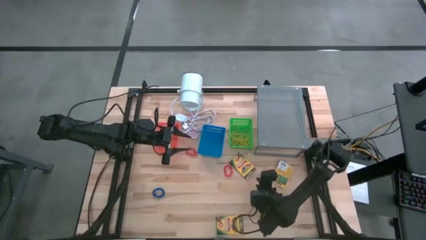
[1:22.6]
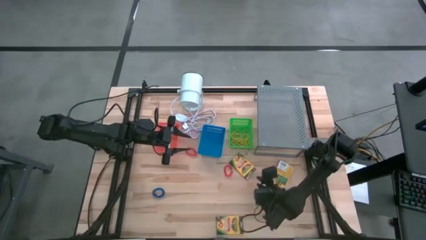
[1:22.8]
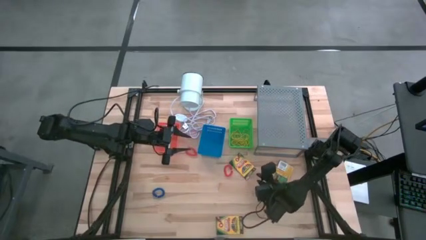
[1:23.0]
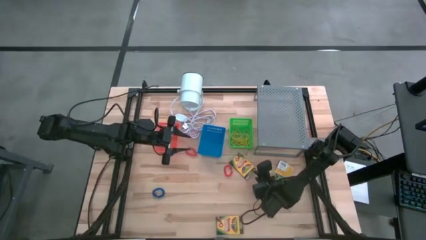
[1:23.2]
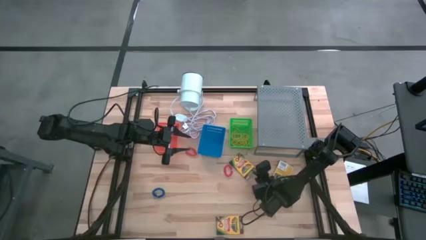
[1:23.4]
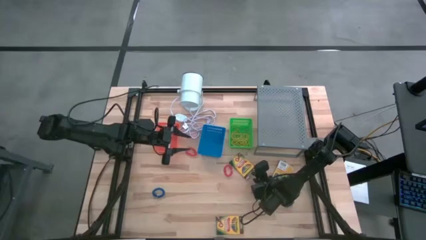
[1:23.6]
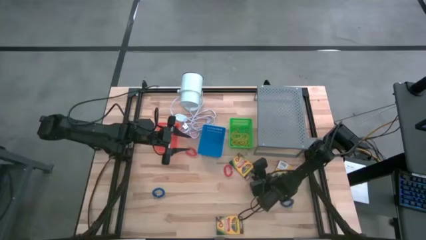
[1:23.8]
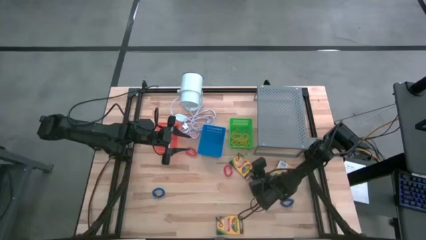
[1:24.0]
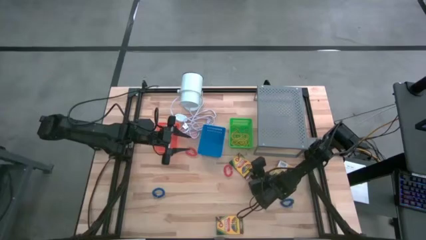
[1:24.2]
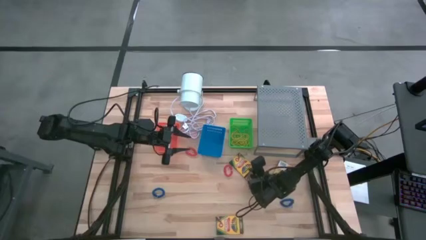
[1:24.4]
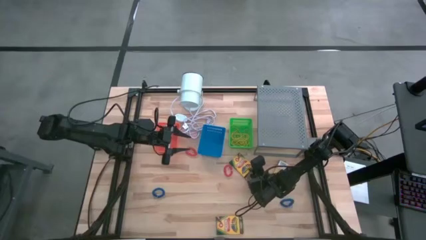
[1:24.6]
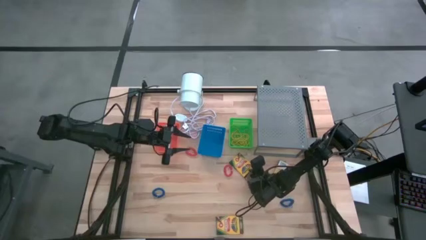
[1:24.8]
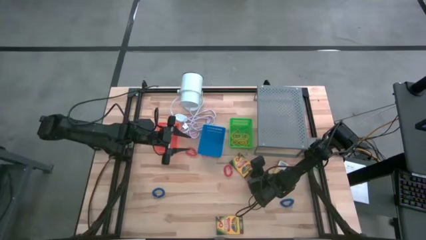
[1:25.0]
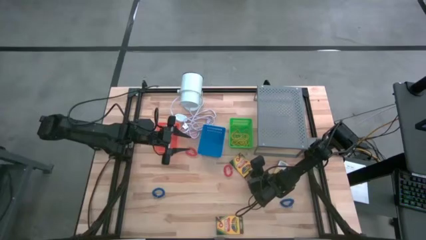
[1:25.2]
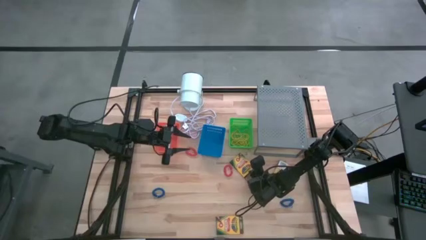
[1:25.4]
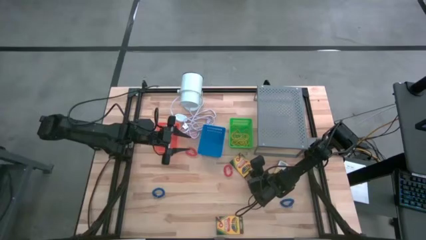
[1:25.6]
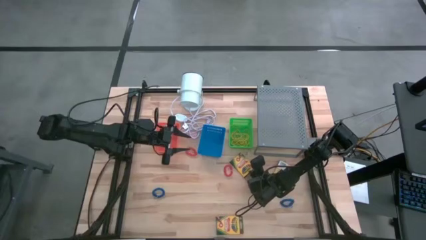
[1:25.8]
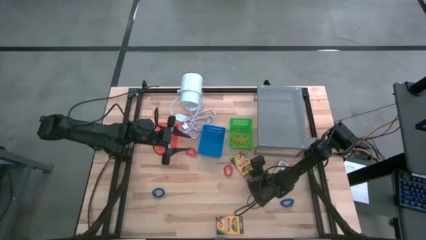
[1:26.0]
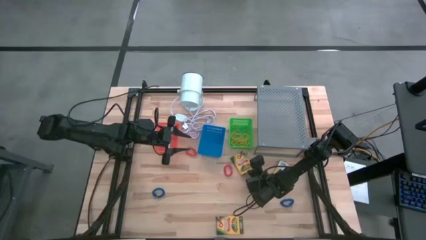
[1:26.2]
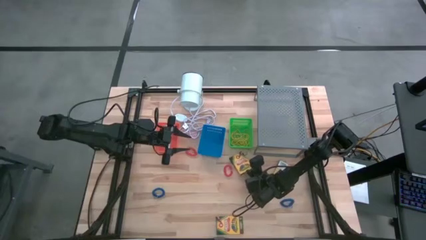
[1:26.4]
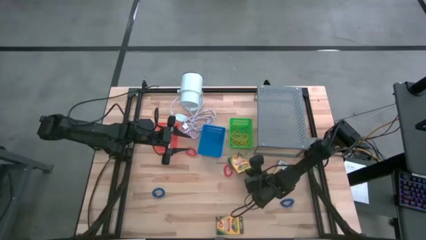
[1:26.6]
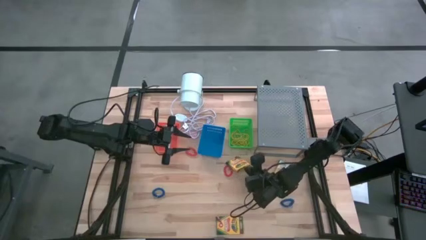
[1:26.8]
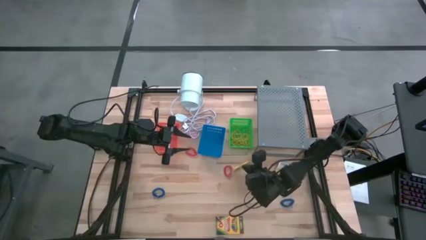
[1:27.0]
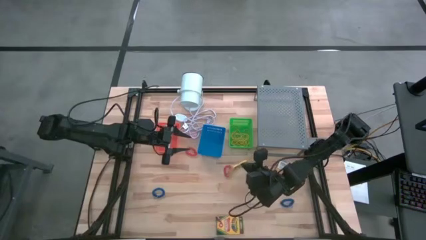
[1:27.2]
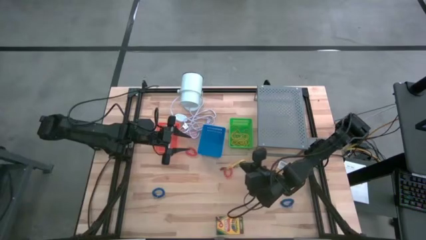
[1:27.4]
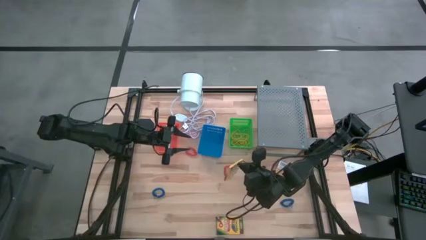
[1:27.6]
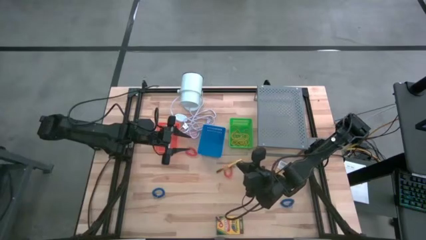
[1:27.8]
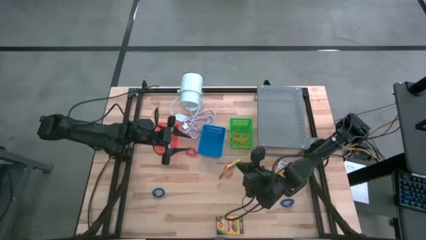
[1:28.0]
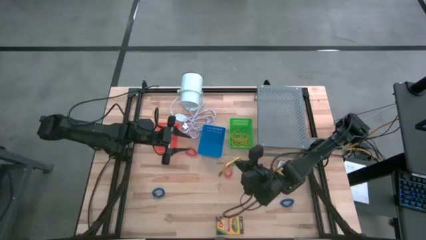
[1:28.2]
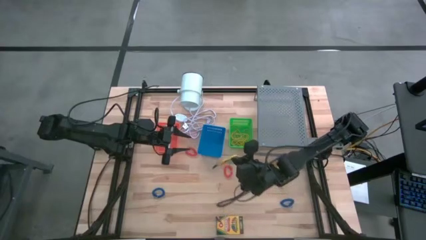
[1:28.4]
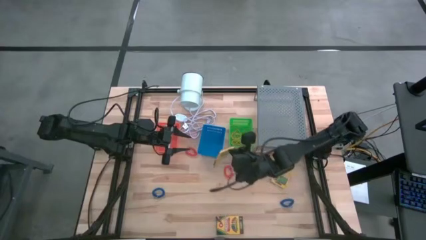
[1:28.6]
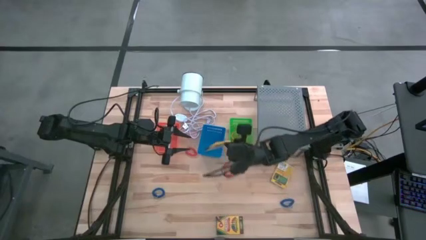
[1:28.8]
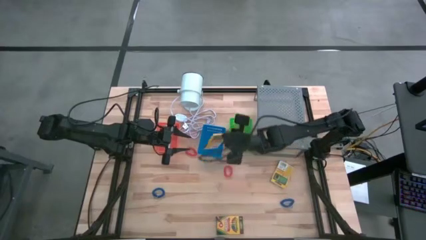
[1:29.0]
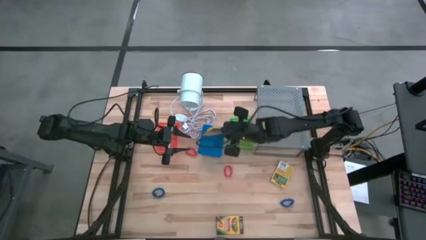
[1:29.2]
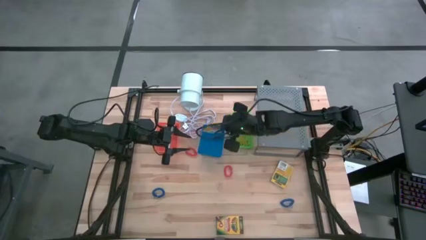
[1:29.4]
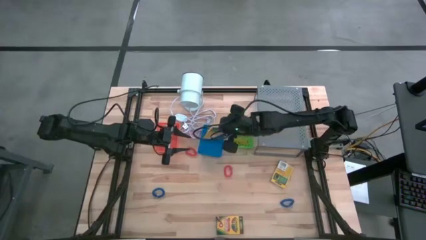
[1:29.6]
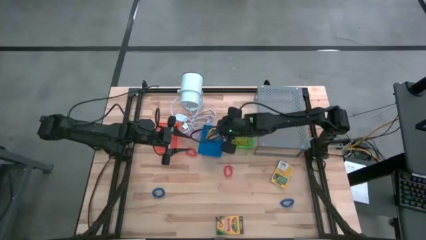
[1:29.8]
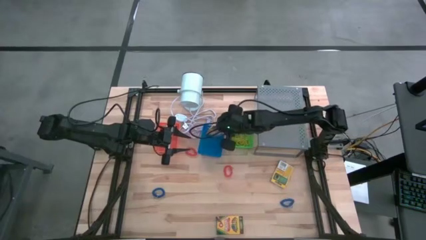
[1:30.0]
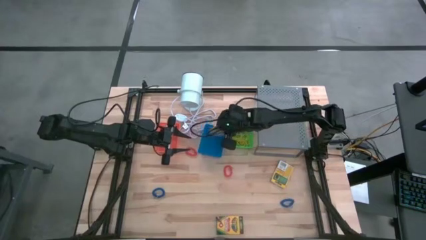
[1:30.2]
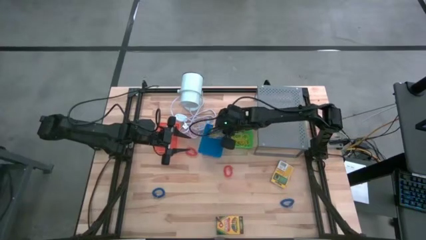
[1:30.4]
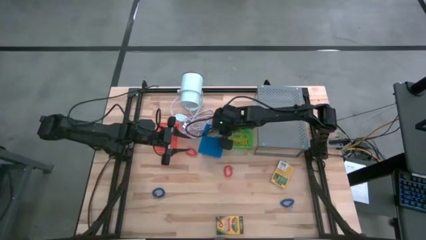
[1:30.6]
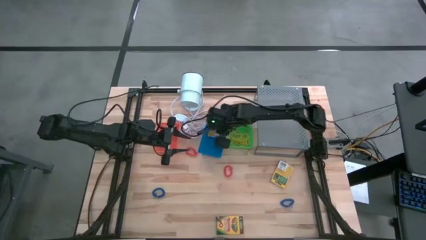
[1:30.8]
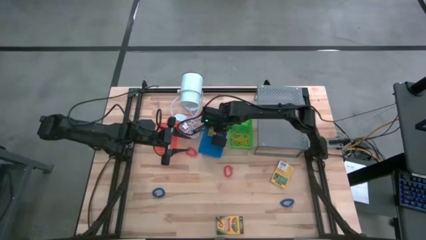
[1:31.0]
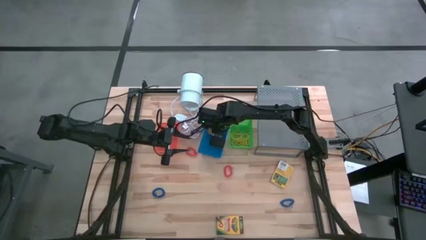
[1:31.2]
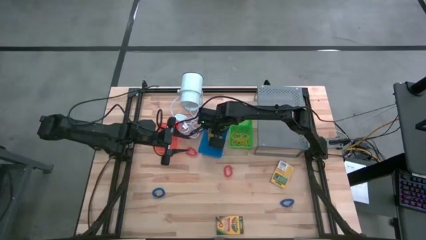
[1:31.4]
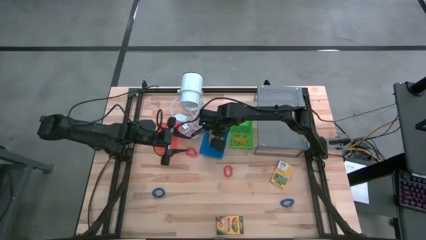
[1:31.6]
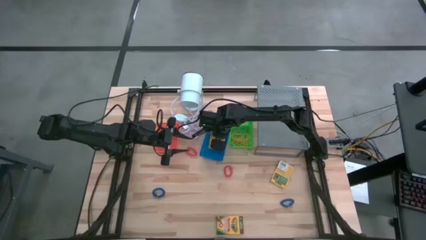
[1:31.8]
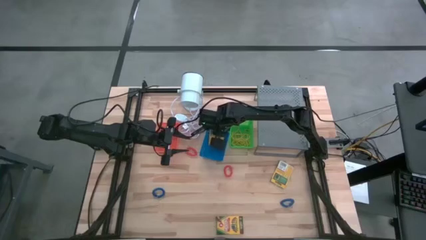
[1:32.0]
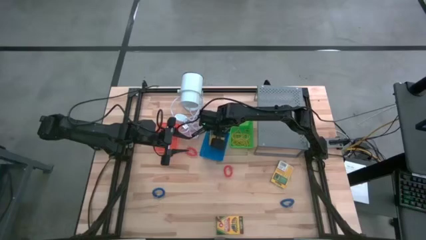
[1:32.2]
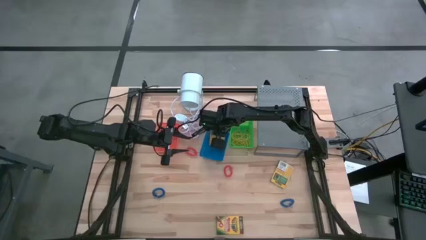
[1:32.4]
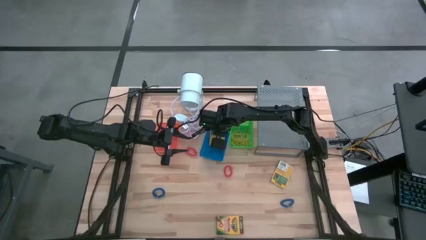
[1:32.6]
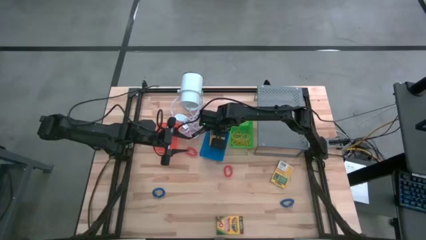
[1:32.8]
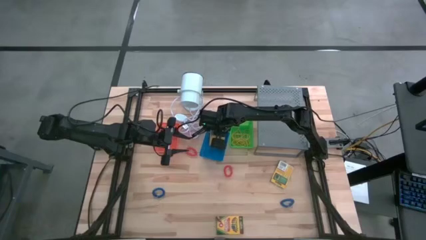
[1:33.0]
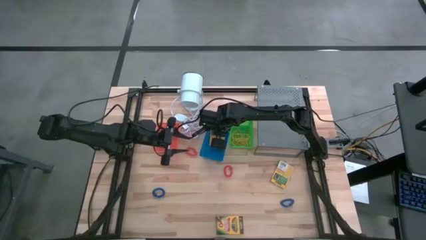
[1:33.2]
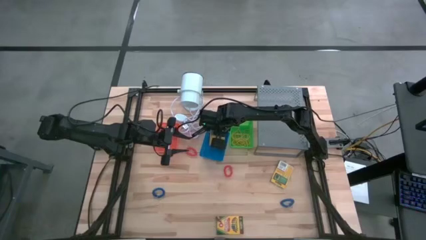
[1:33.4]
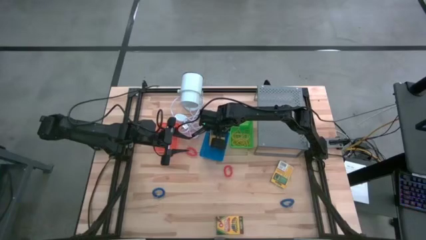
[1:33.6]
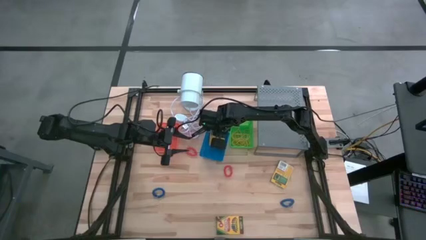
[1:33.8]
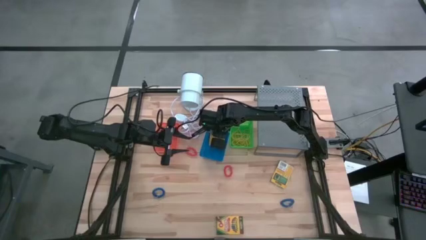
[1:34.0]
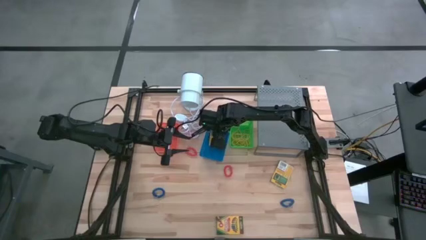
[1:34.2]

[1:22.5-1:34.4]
Task: Pick & Place Office Desk Supplies
Put the pack of crayon into the blue bin
